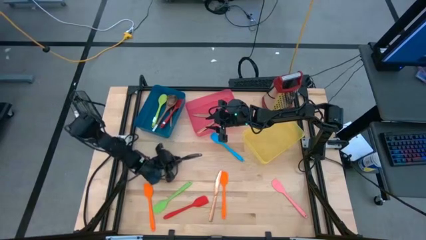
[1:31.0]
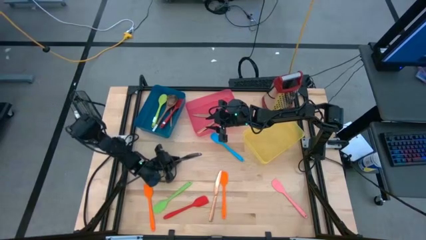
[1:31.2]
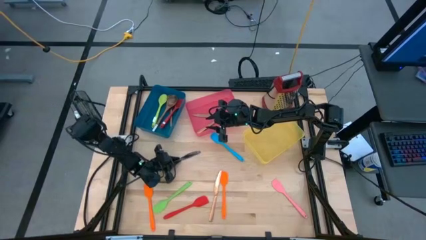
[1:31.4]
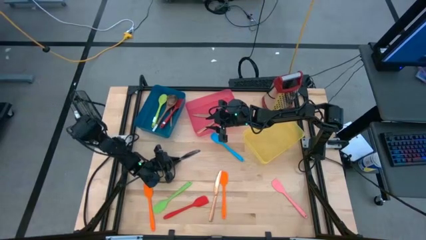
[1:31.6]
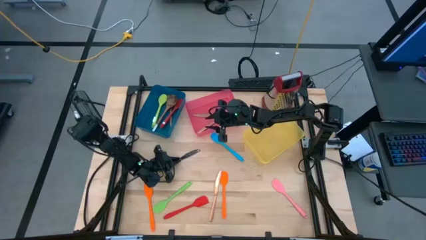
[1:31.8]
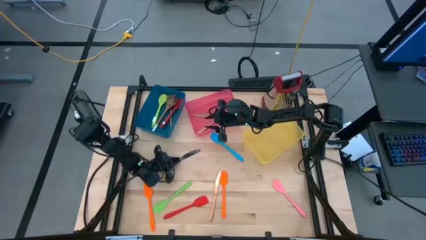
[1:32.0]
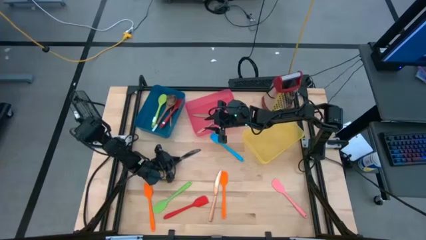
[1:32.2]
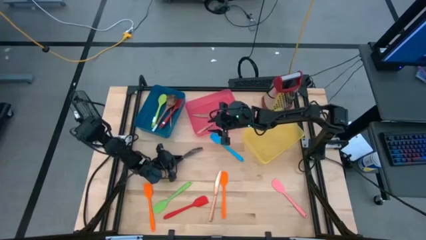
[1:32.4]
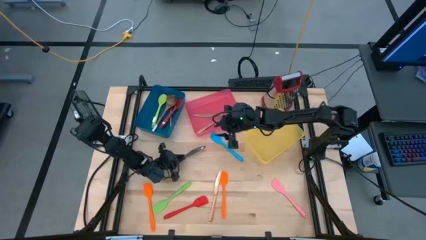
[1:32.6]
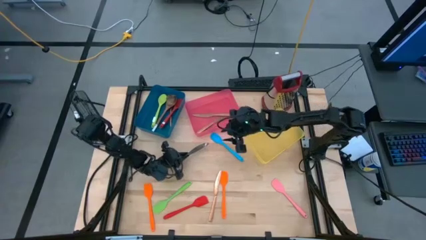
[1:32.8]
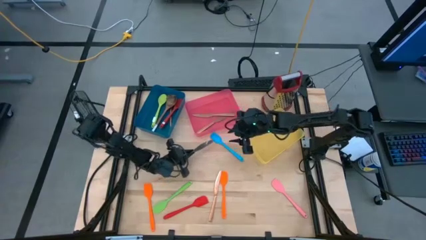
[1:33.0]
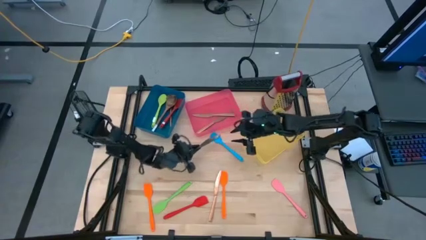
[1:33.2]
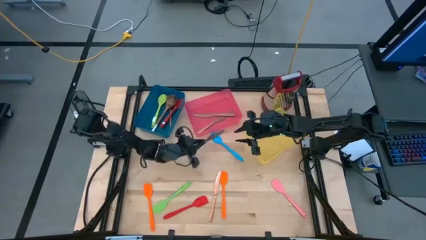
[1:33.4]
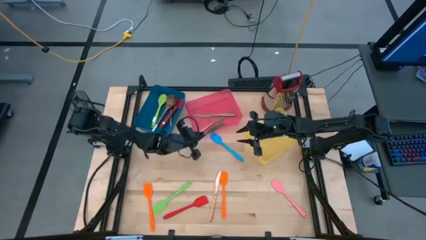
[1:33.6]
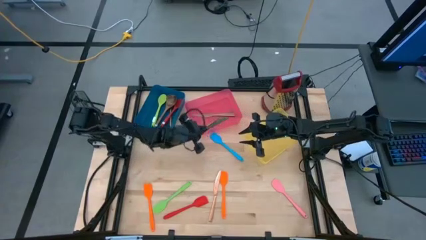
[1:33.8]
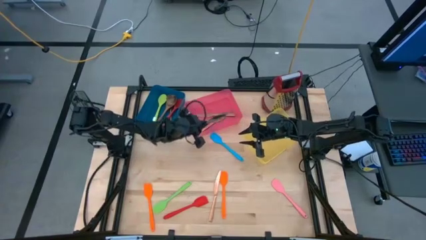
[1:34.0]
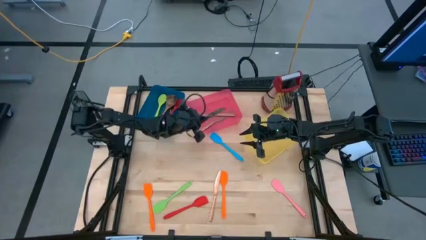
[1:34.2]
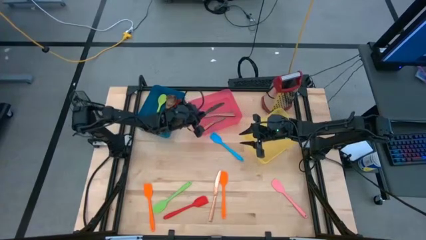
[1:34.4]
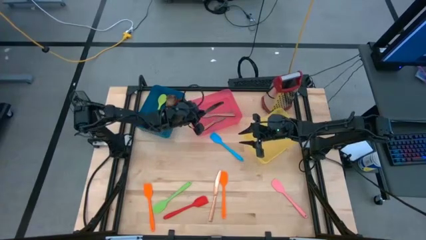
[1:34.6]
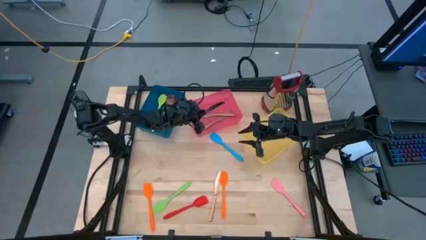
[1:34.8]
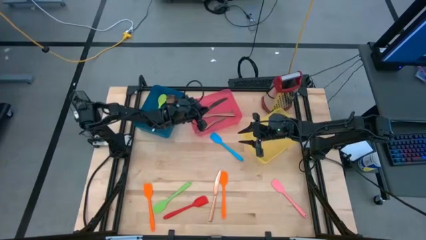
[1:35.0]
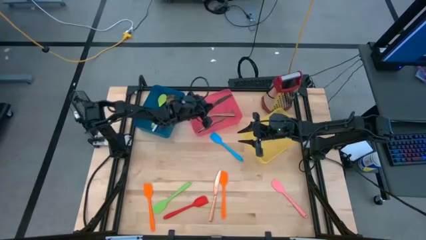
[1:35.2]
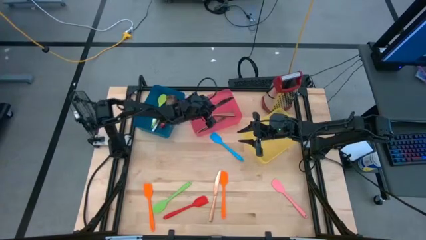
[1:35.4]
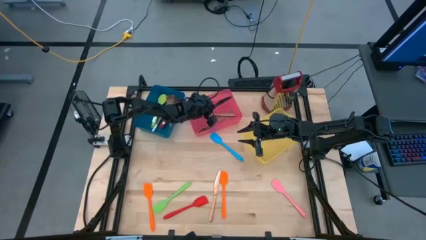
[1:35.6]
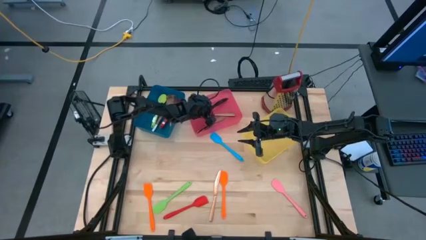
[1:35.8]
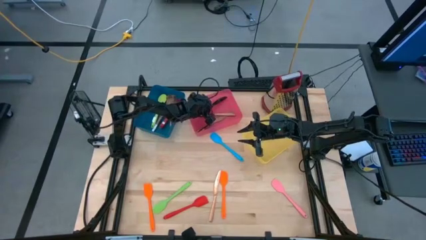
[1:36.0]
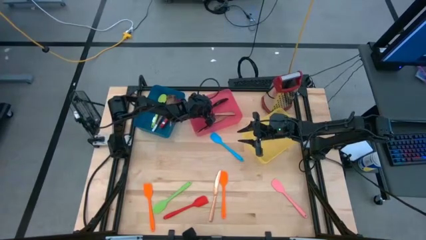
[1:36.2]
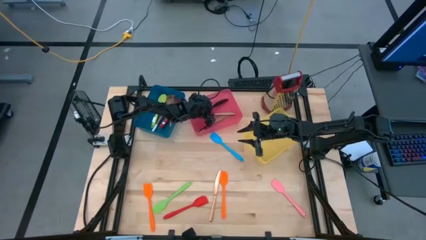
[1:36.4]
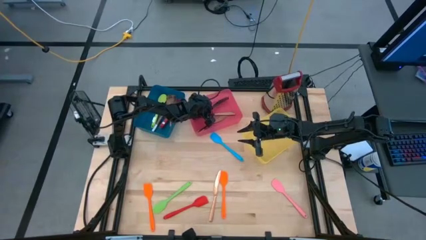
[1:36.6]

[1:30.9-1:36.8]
Task: Pick & Place Kitchen Items
Put the black knife into the pink bin

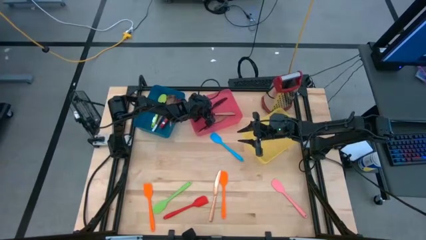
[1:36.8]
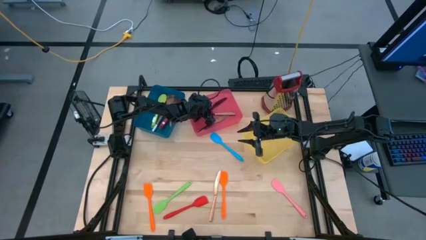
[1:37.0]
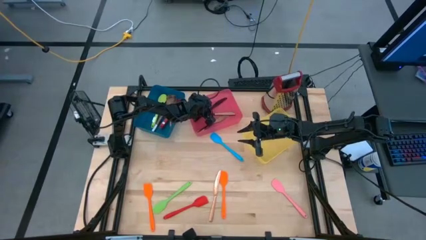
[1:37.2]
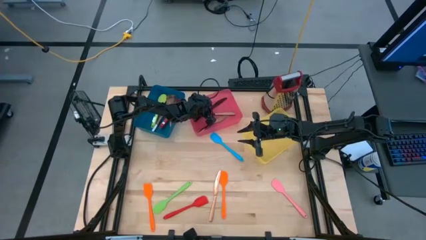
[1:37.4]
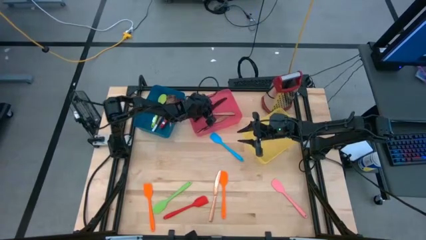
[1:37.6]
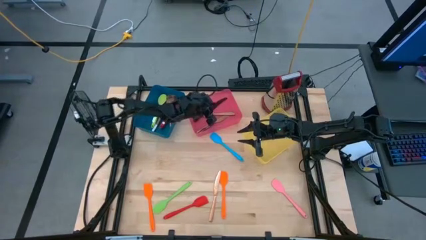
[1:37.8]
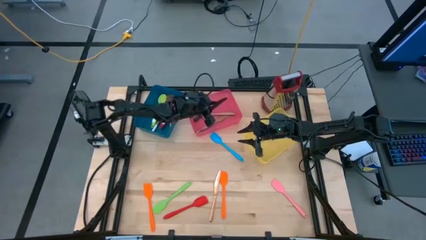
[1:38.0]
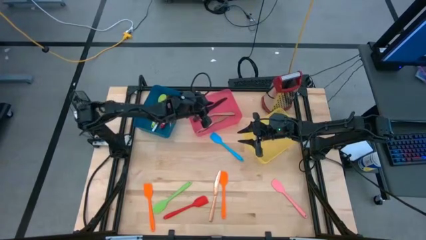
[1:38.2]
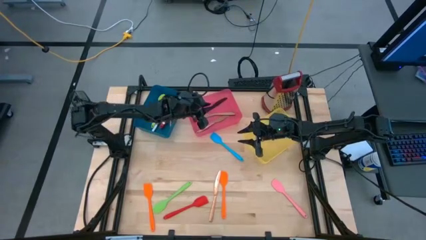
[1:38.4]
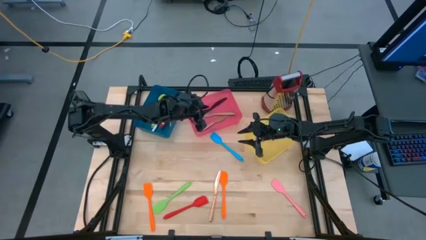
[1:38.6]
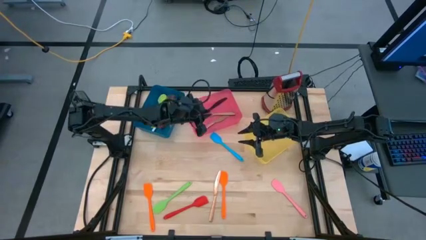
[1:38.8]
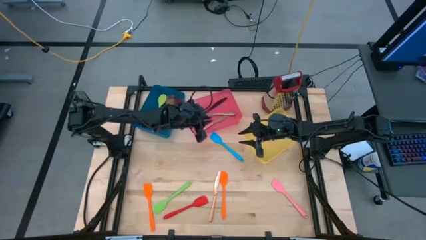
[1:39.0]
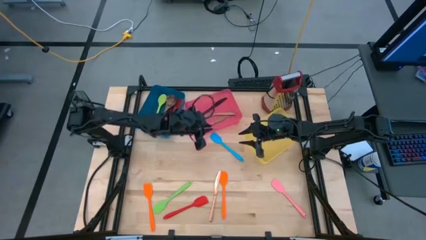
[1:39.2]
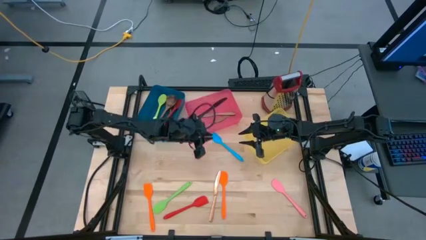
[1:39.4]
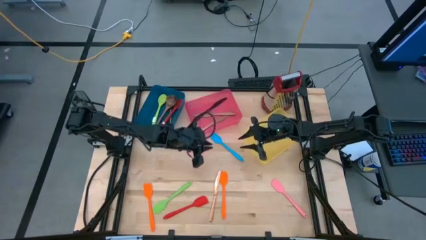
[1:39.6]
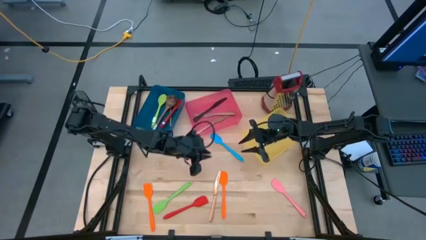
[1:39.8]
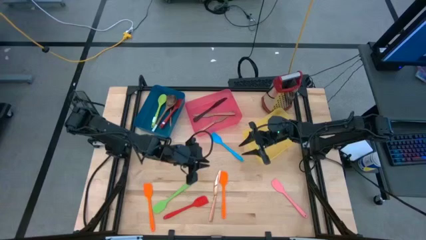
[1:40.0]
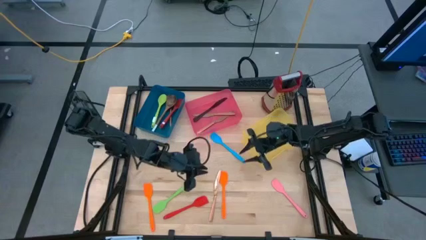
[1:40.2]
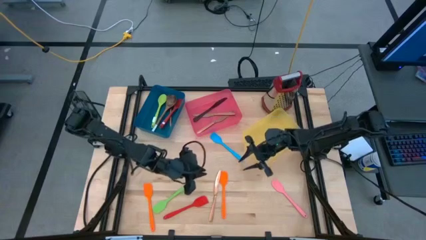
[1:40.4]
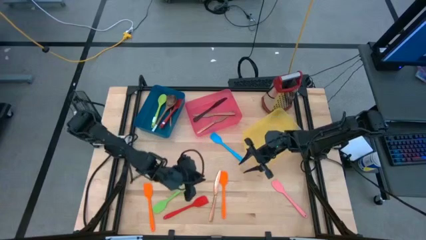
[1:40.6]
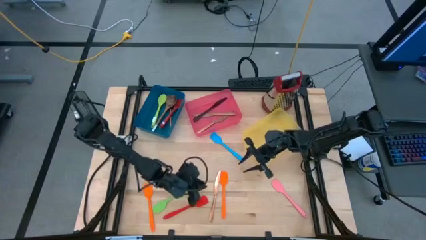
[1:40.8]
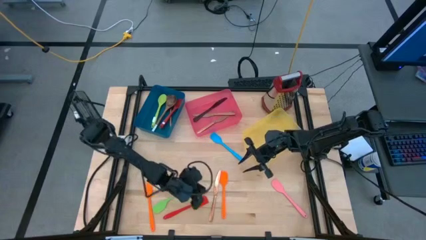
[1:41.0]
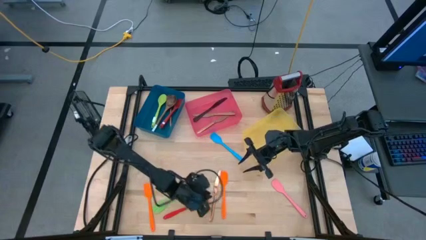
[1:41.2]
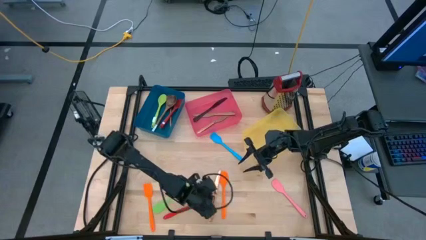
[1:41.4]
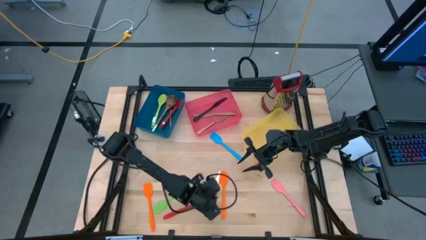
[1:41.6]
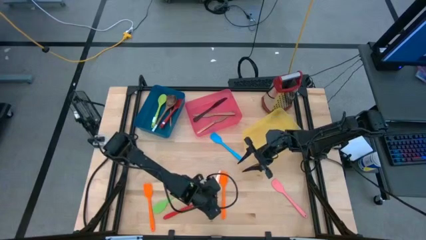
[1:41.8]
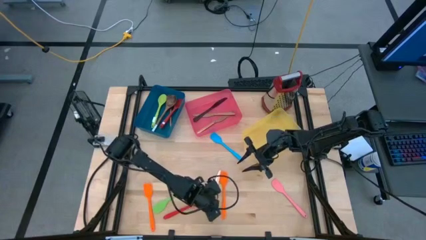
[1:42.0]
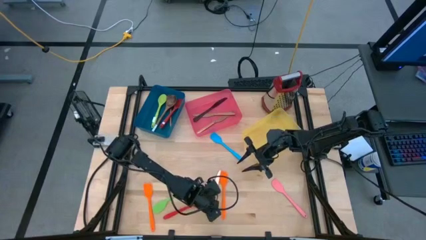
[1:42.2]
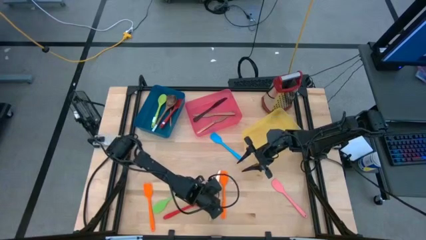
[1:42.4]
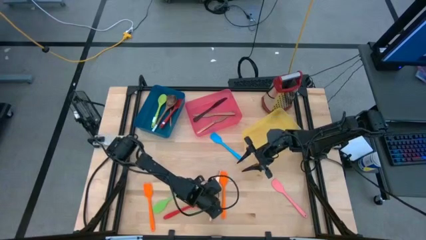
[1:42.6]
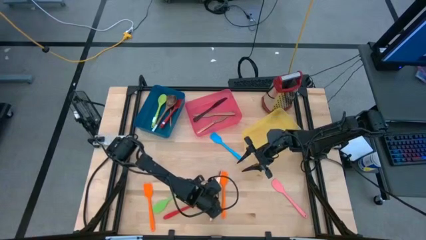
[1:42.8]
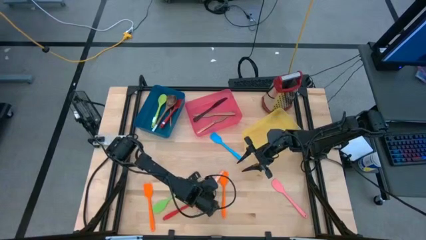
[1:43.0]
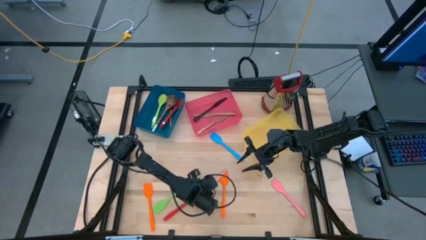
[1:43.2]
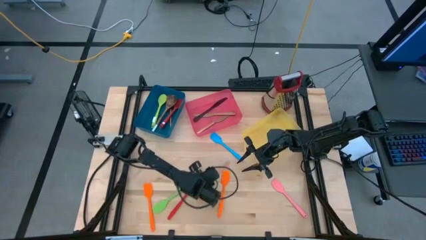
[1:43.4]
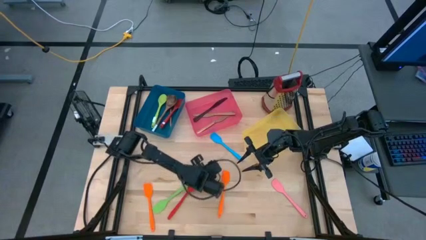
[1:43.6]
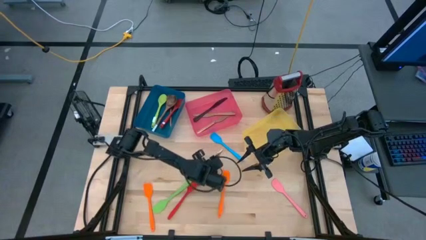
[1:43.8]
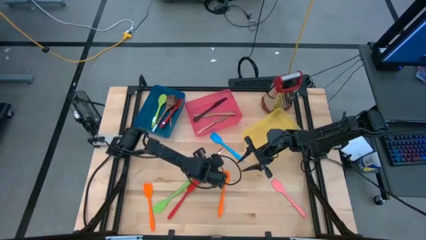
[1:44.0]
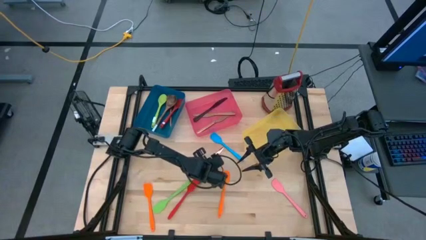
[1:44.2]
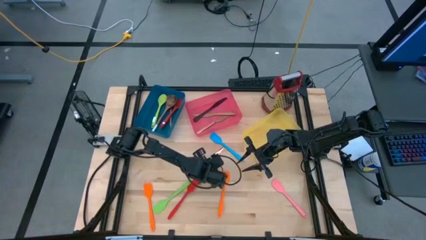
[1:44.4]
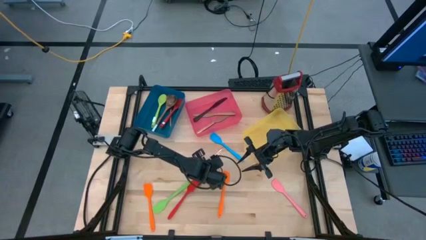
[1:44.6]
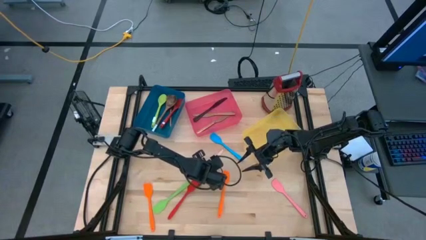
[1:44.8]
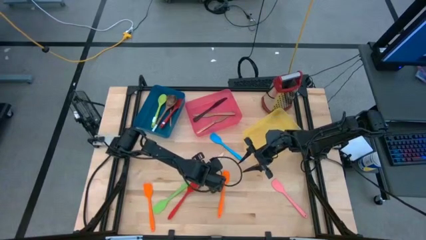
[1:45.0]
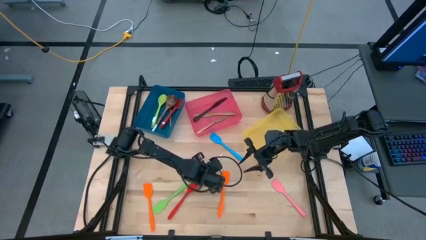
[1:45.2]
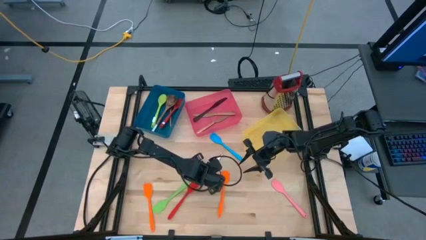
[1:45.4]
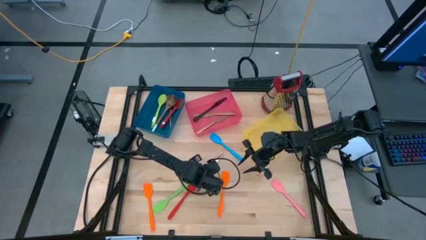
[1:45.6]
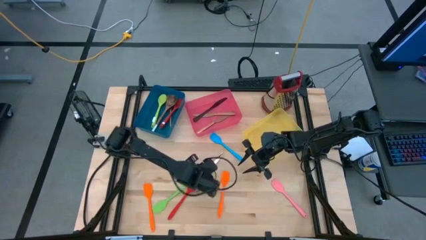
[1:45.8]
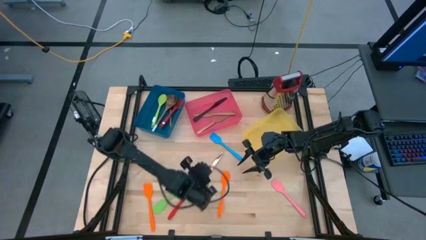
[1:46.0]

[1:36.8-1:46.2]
Put the gold knife into the pink bin
